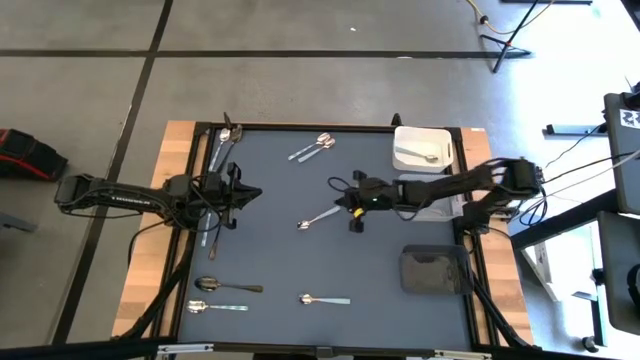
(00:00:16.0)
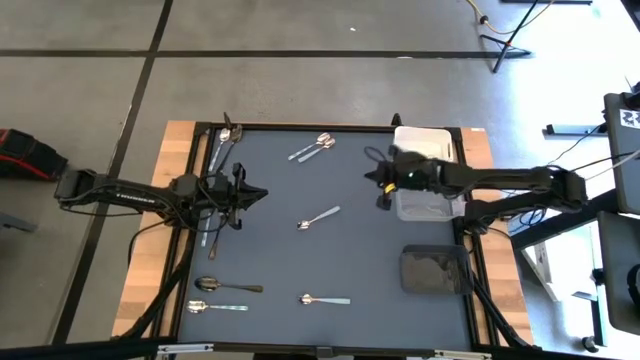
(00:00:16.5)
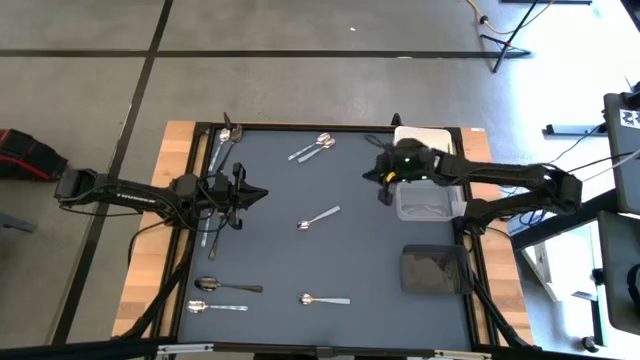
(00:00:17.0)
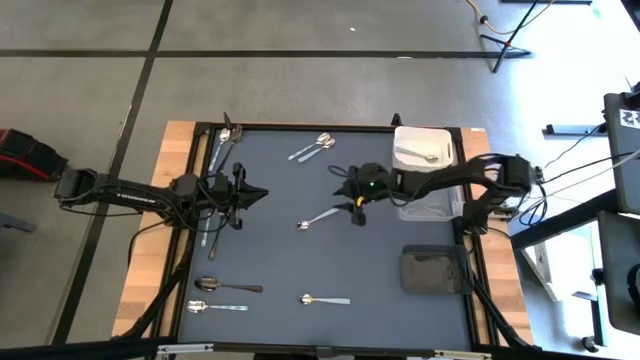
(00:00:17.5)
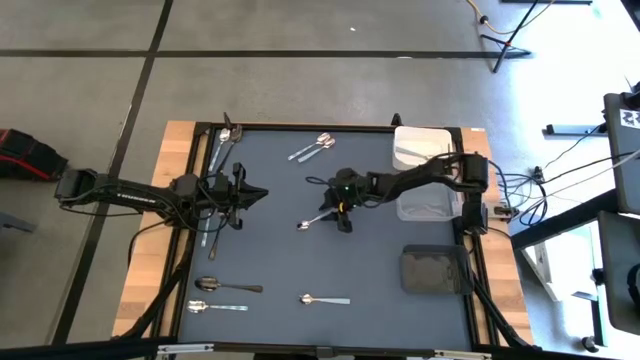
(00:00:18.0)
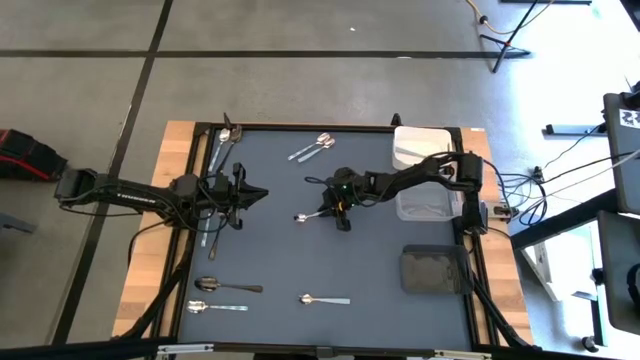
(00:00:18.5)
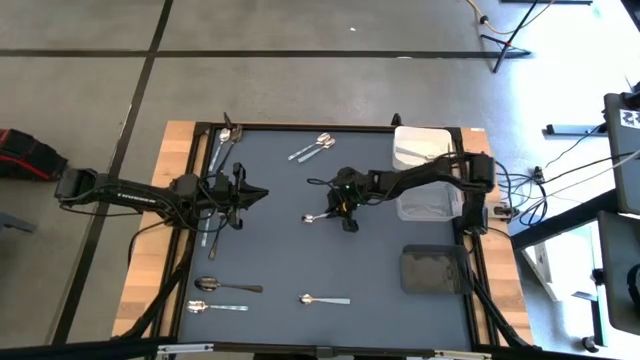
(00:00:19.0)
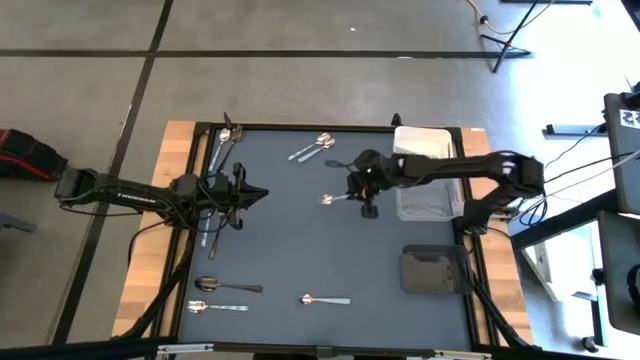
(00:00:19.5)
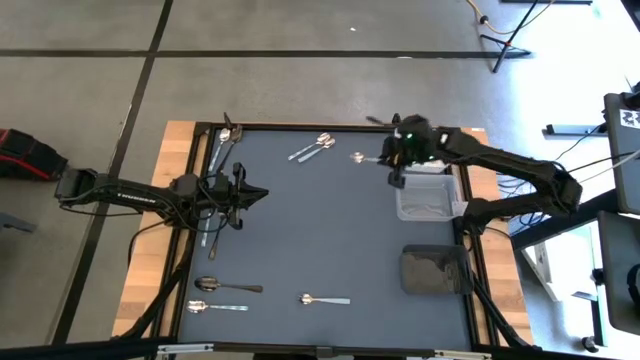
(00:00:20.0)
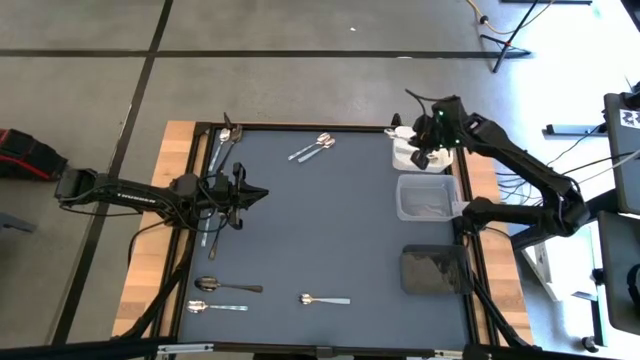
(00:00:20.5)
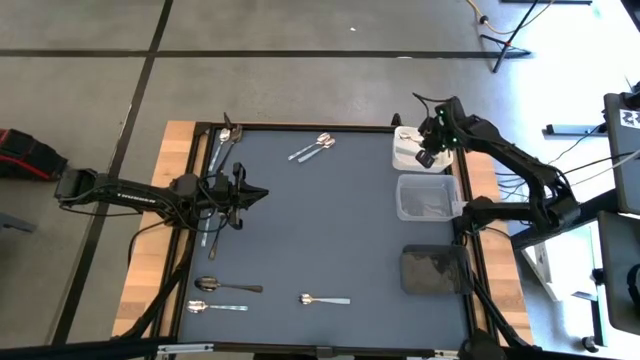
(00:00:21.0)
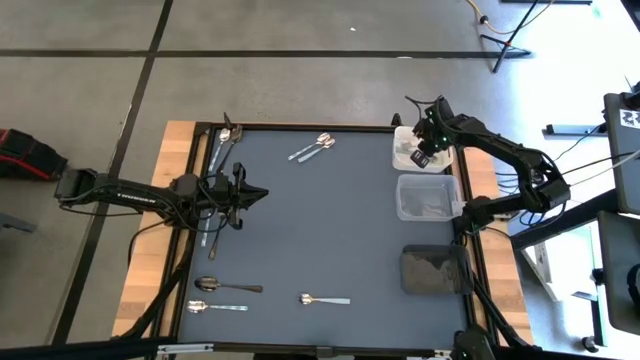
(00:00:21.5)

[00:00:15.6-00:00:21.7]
Task: Sort silverware by color (type)
Put the light blue spoon into the white bin

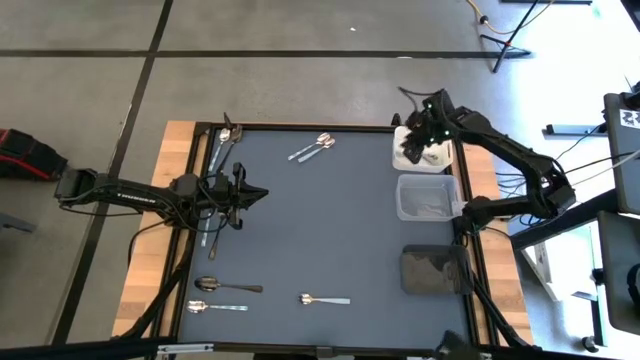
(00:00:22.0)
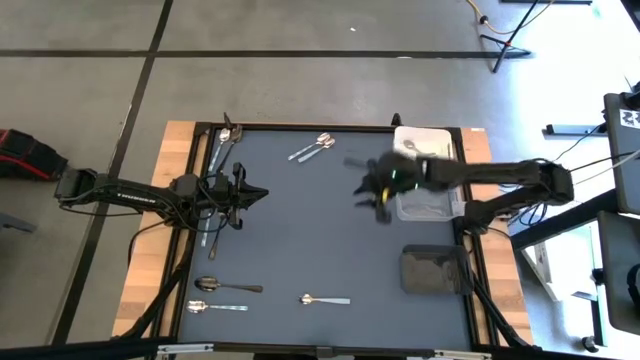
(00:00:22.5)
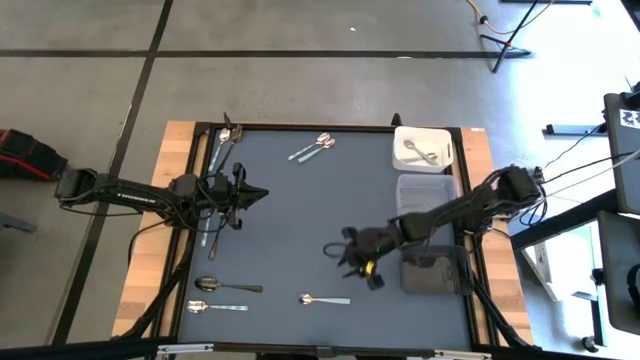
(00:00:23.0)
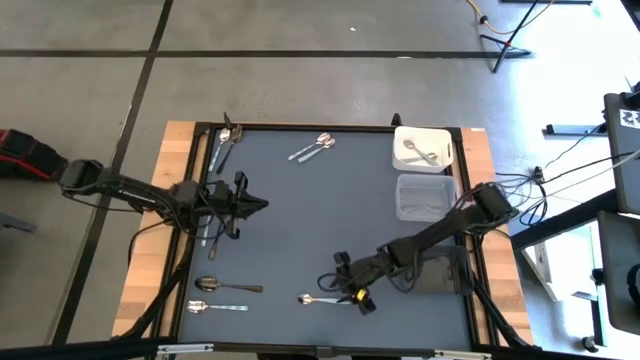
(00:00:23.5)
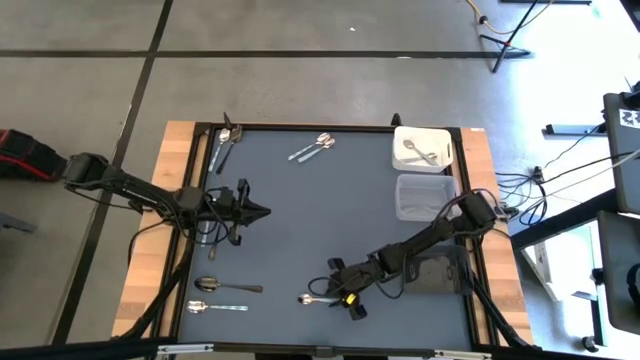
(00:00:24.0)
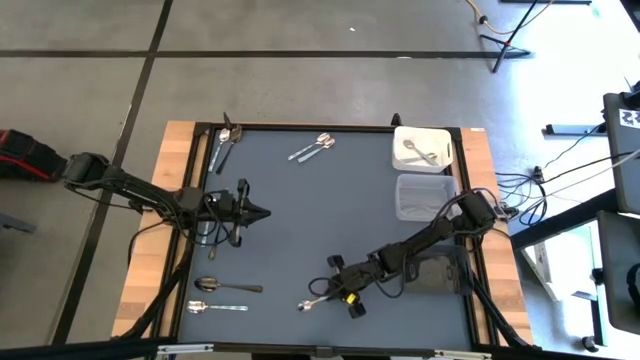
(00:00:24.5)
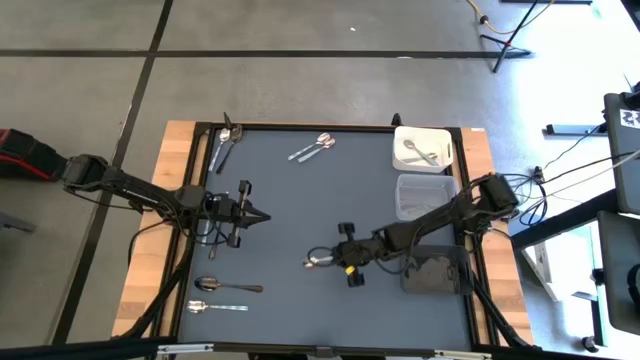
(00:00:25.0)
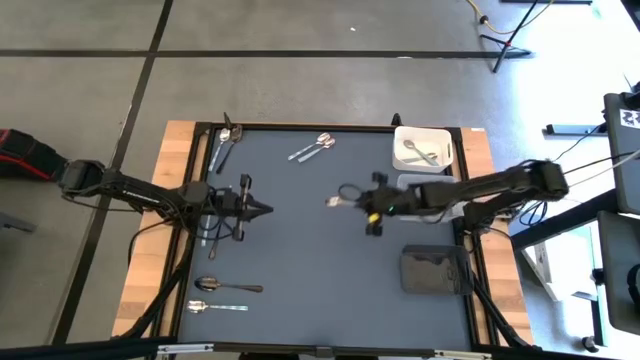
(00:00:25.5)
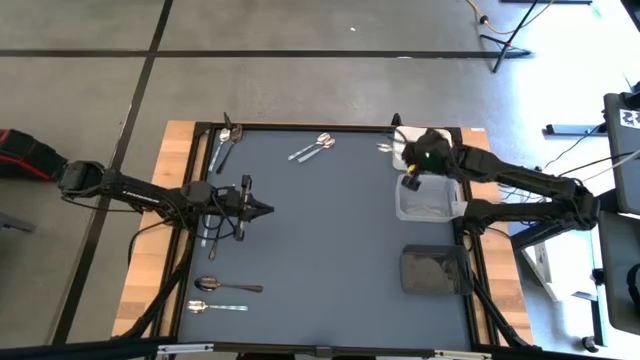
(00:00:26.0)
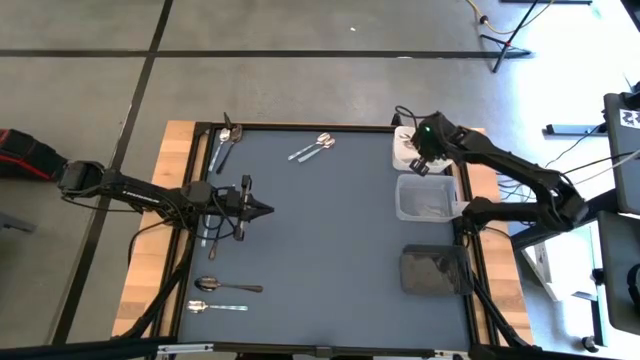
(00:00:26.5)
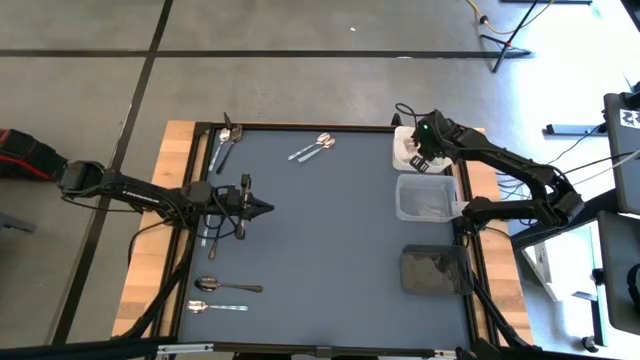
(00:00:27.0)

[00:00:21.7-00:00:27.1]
Put the light blue spoon into the white bin

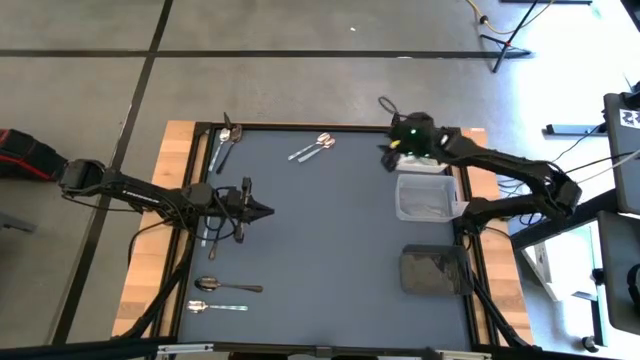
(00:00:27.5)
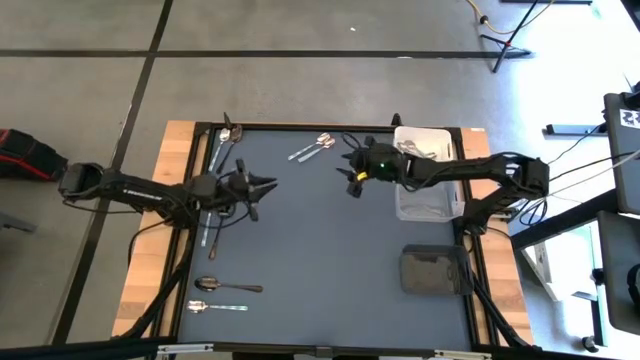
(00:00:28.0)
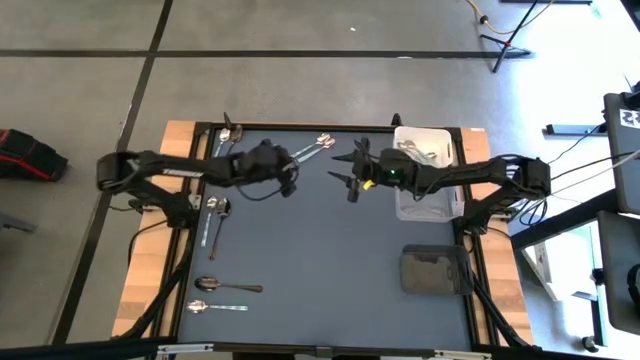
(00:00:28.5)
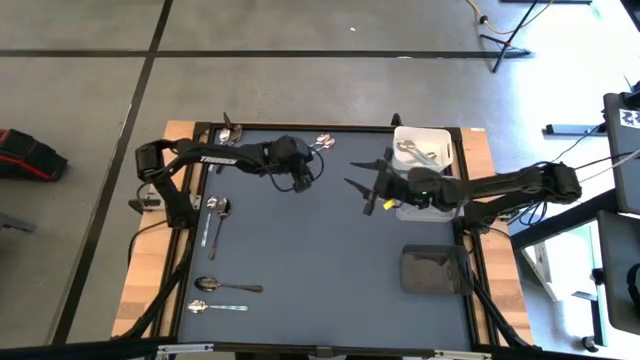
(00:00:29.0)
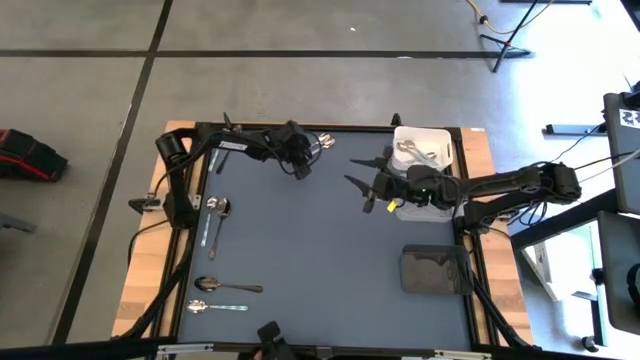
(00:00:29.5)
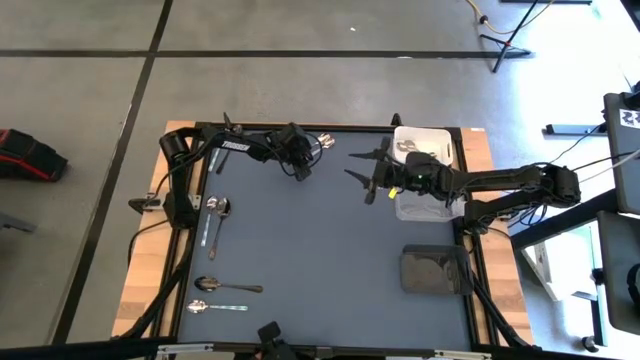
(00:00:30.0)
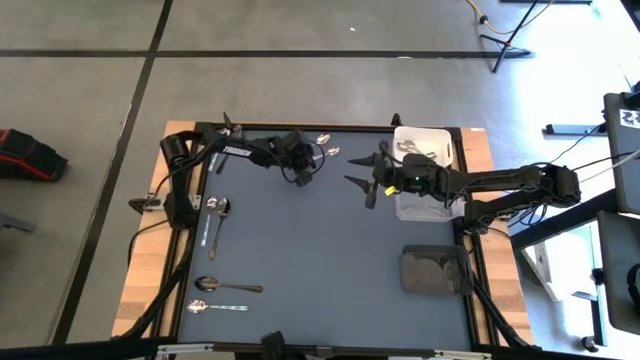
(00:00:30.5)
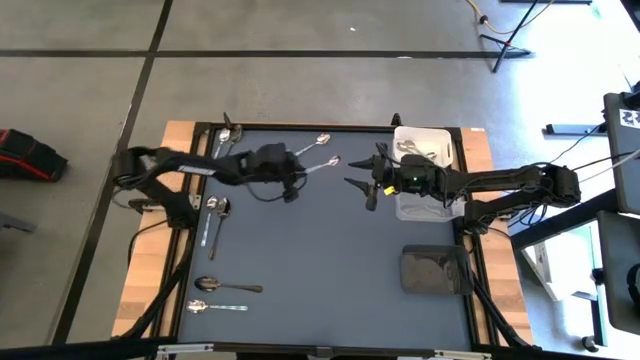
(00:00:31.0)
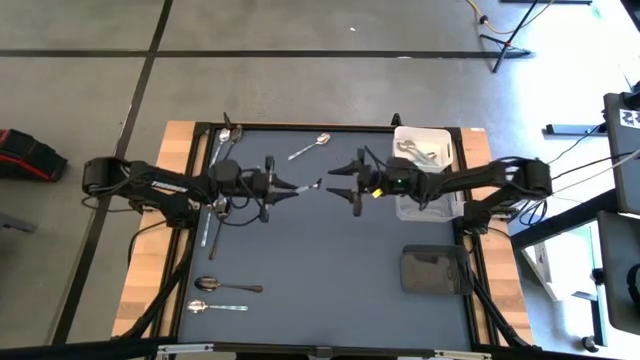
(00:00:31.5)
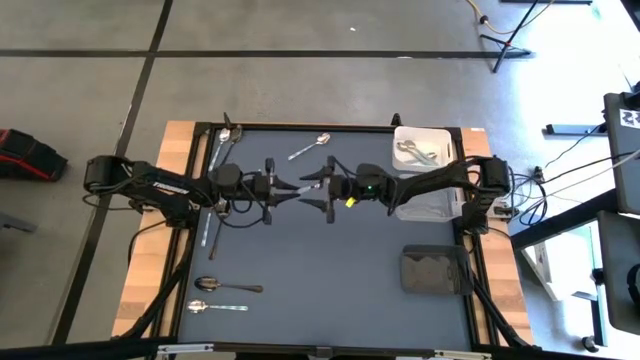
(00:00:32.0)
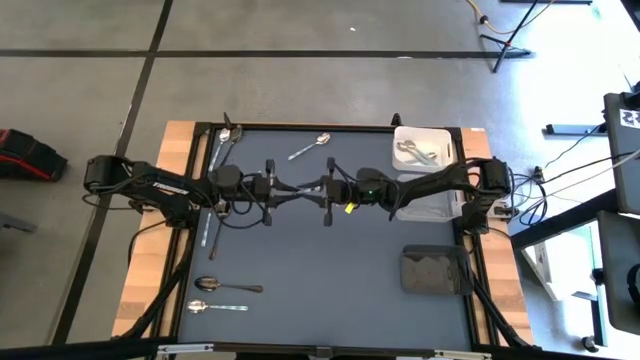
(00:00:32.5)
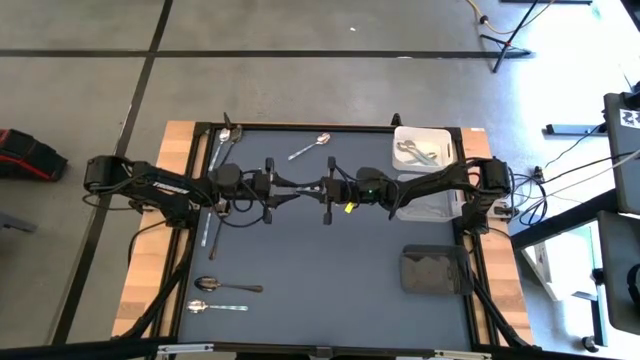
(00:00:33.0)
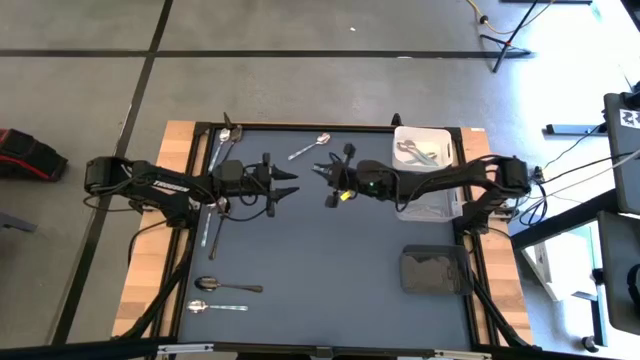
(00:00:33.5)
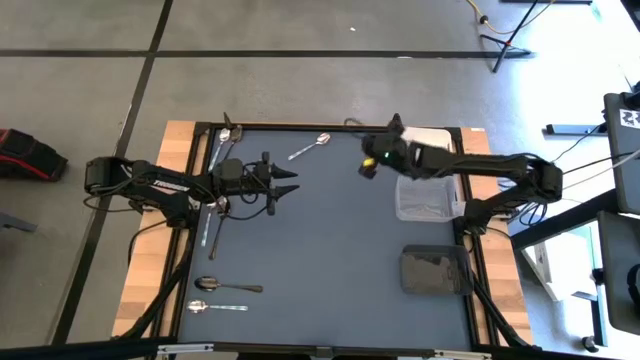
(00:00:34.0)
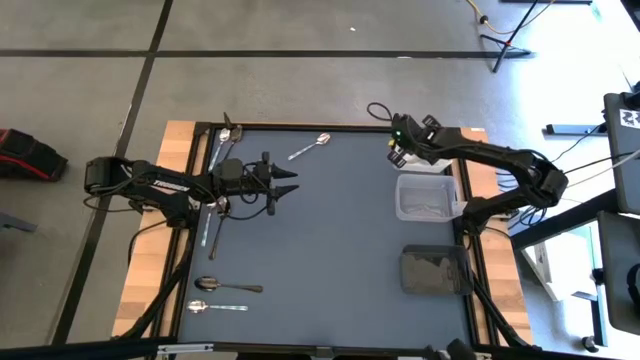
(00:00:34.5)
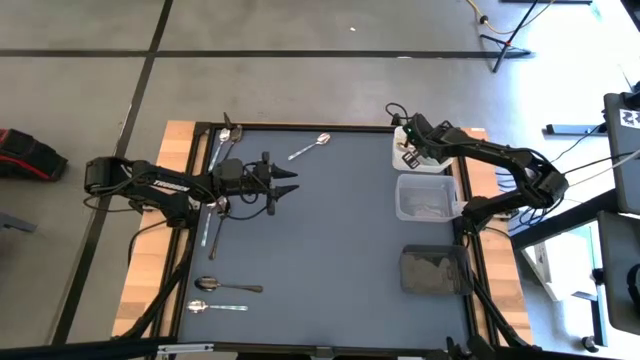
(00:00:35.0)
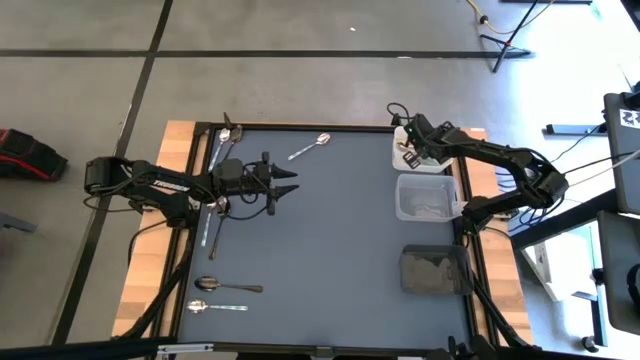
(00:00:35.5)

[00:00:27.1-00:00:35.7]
Put the light blue spoon into the white bin

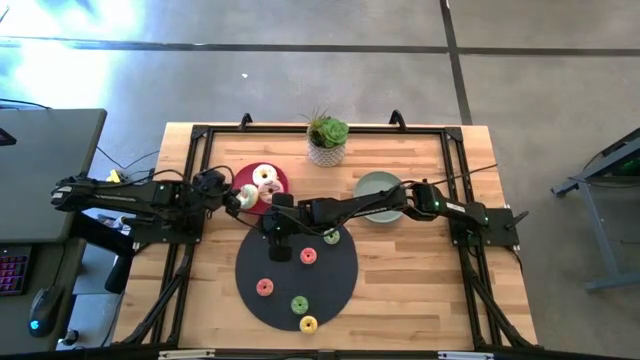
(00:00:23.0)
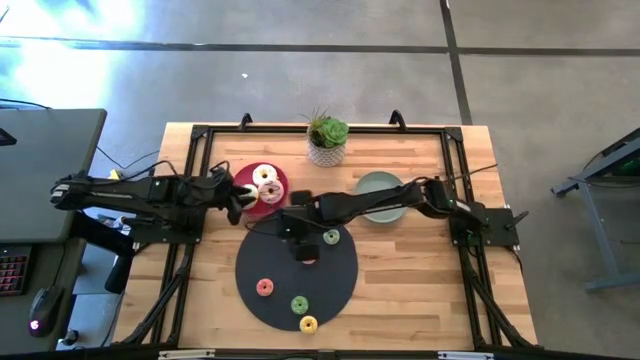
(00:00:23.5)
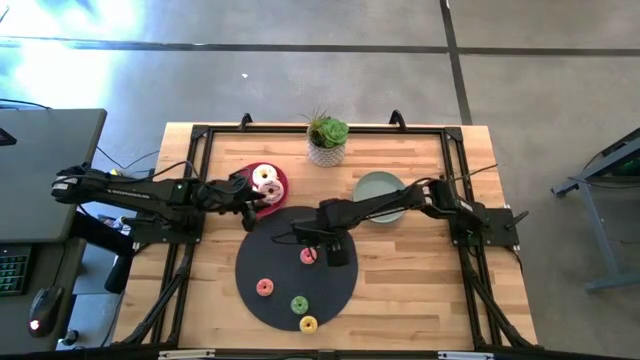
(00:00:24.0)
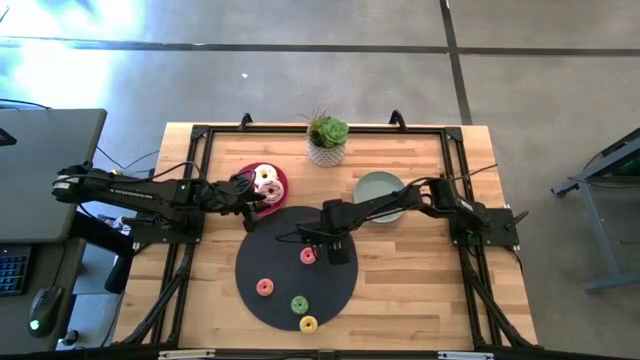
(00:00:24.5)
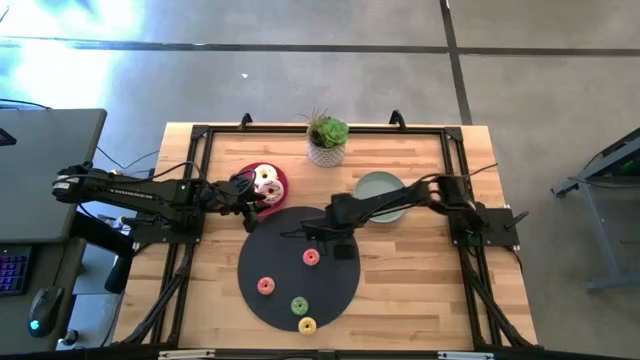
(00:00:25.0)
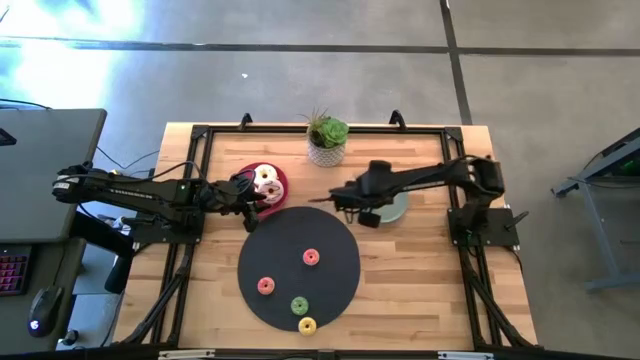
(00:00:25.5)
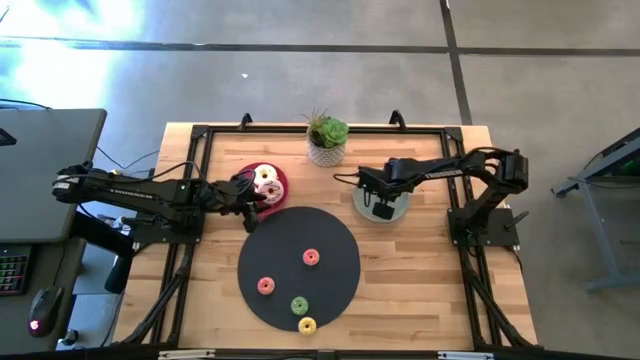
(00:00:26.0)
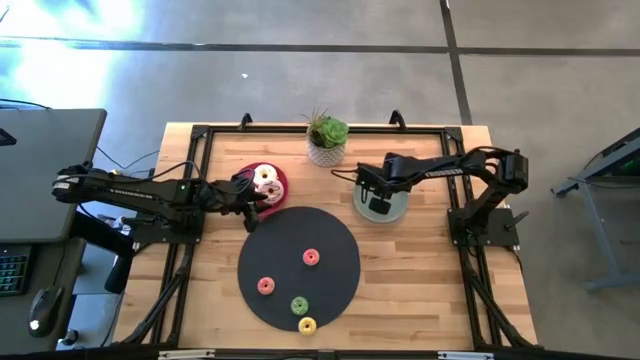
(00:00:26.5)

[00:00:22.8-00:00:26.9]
Task: Pick & Place donuts
Put the top small green donut on the gray plate
